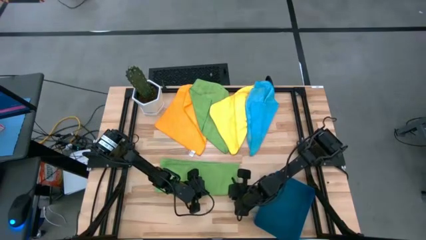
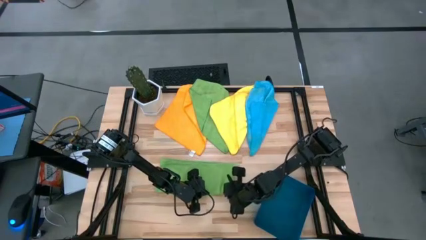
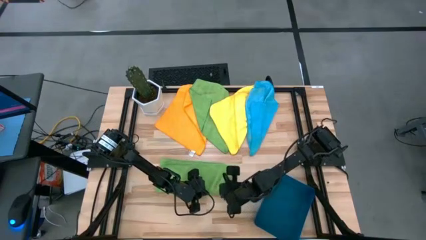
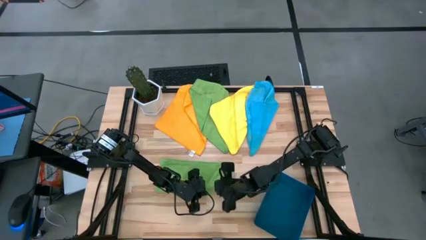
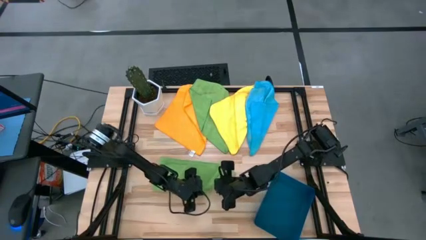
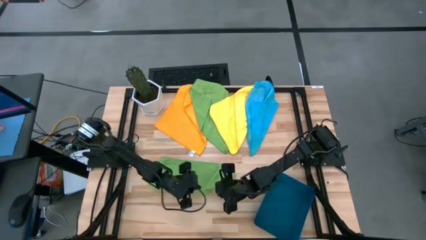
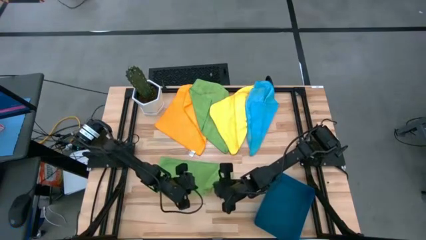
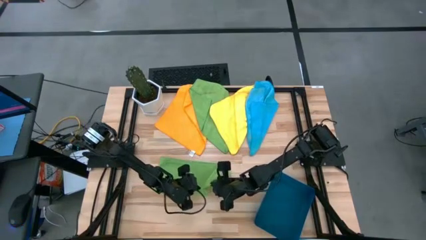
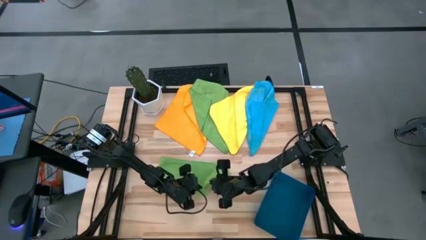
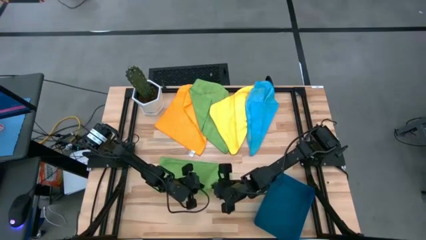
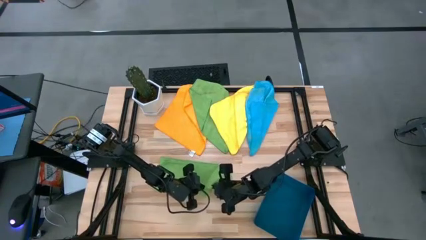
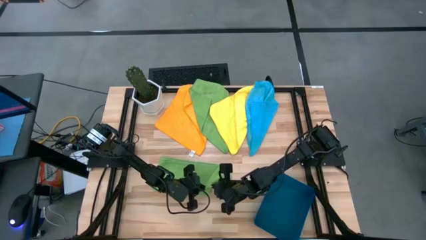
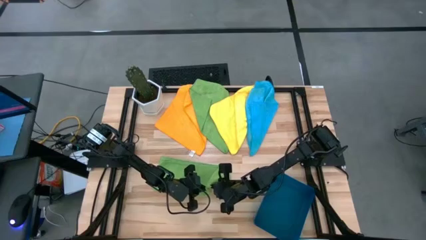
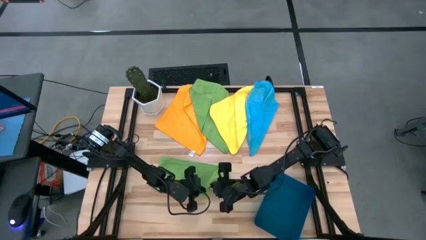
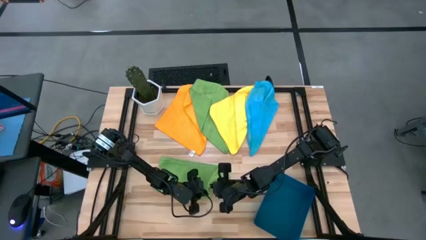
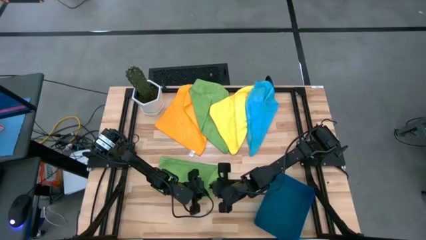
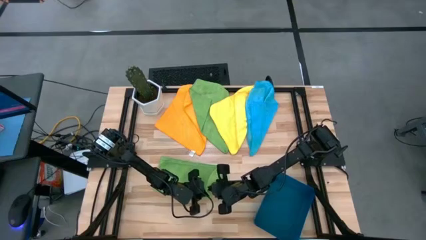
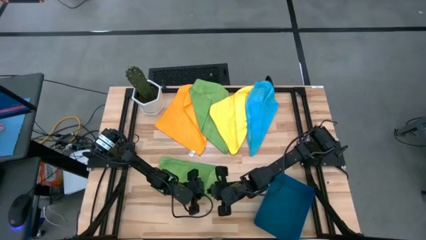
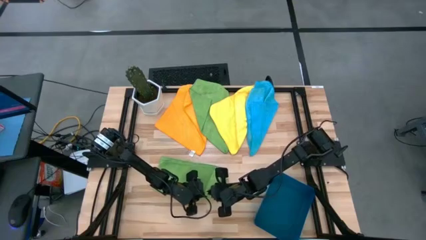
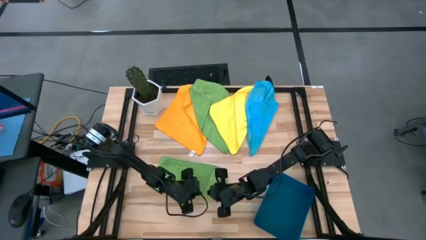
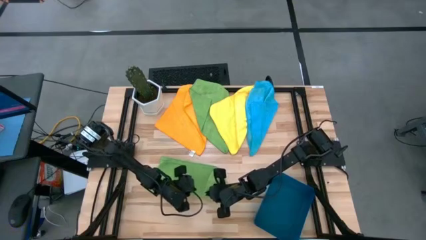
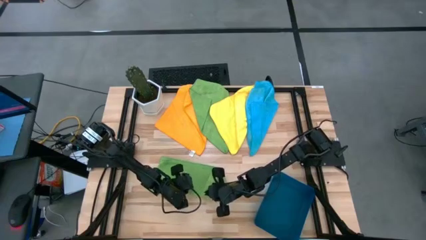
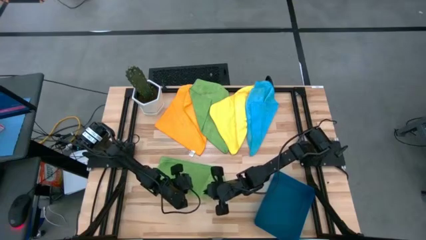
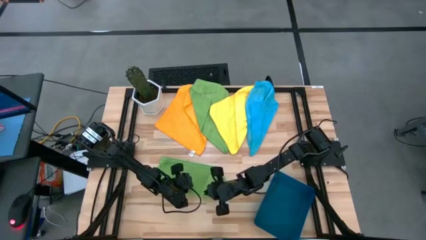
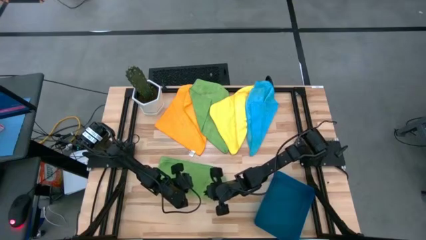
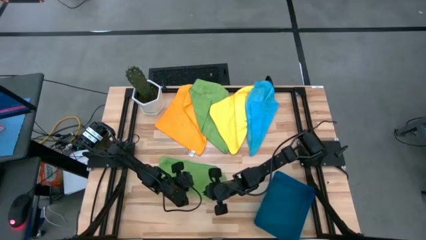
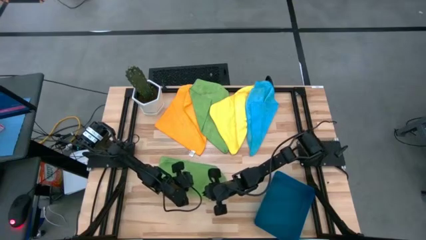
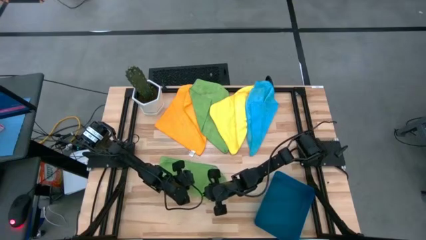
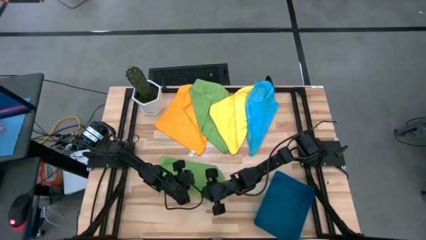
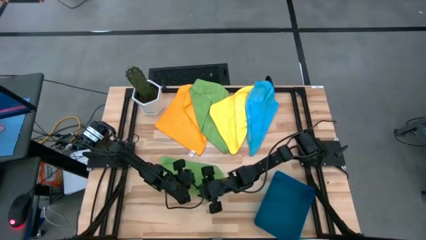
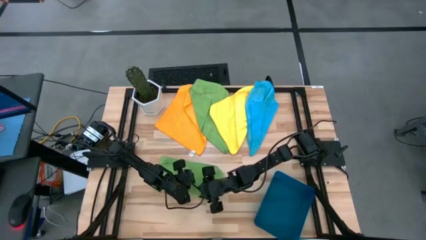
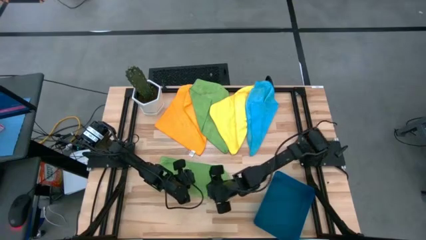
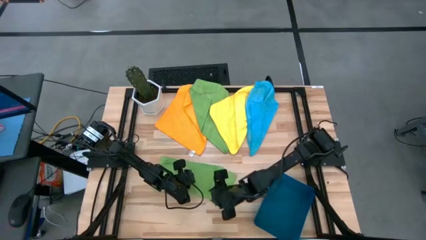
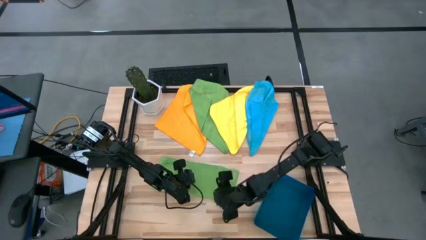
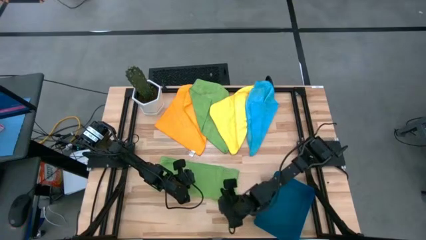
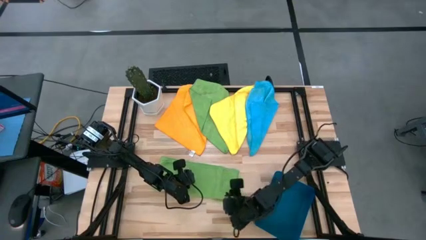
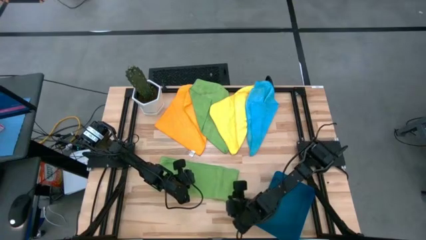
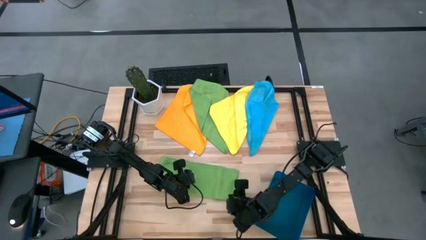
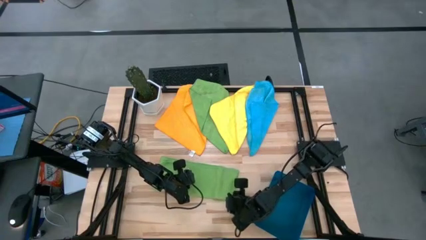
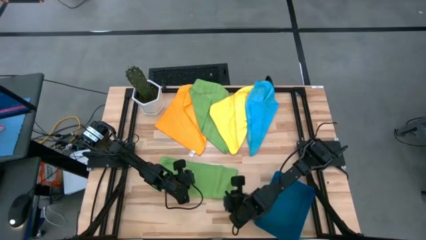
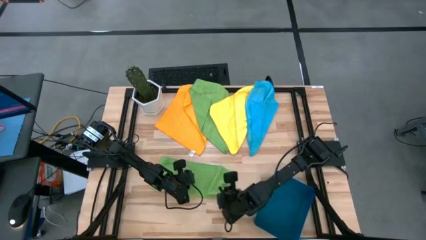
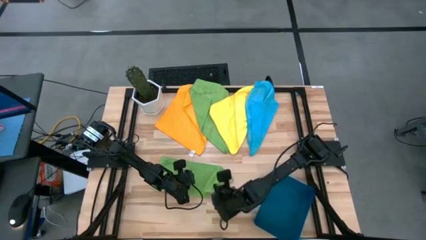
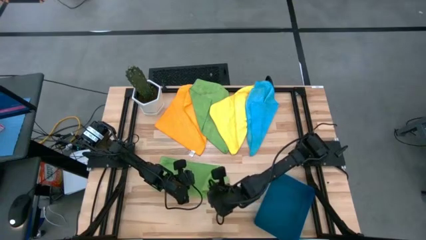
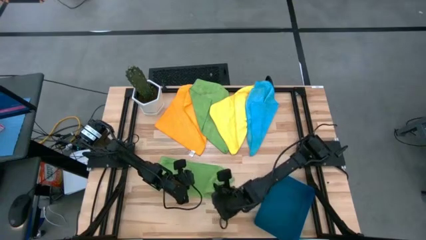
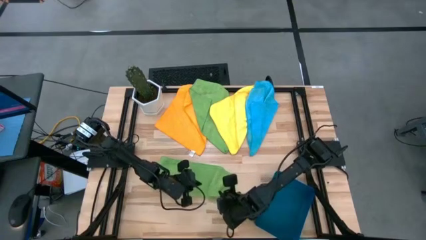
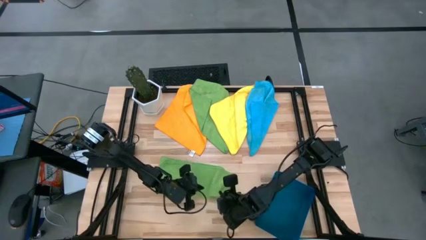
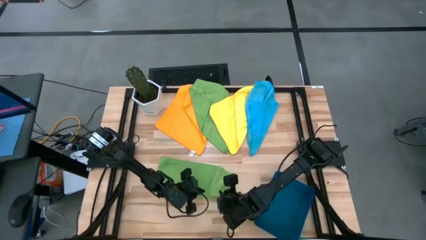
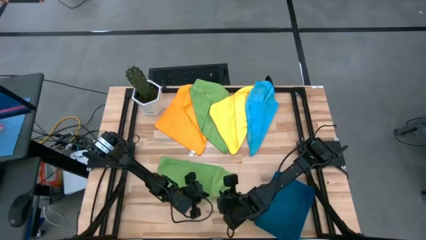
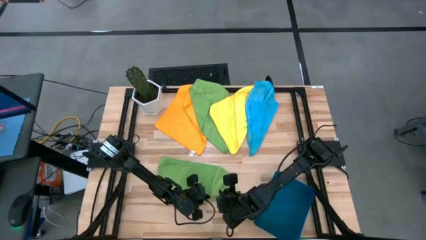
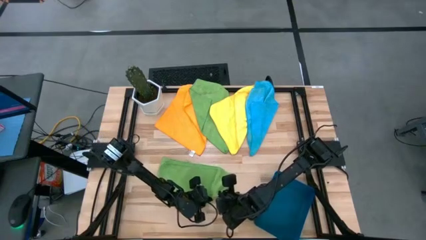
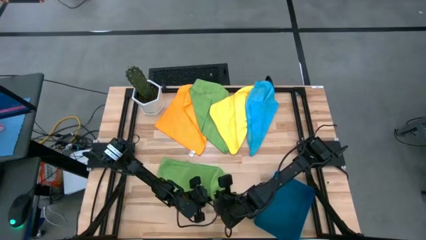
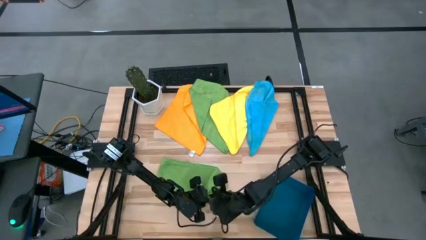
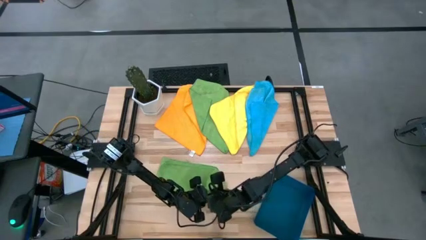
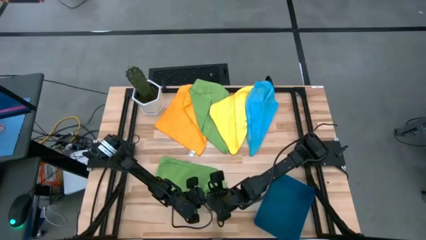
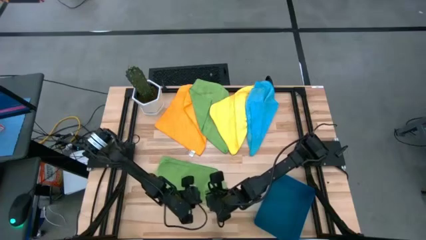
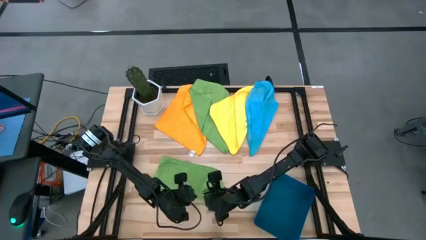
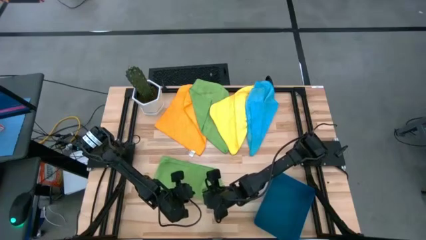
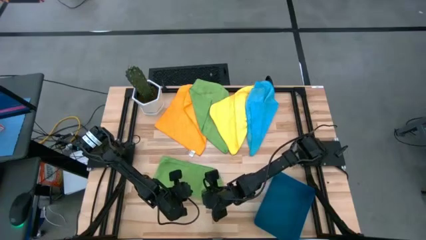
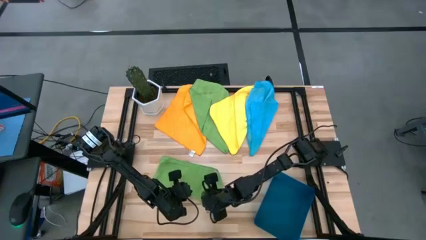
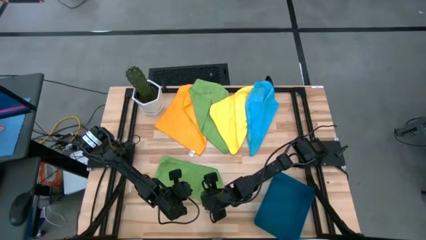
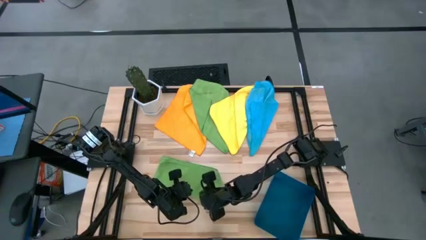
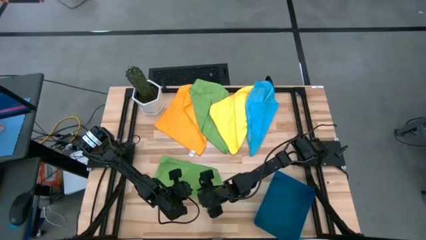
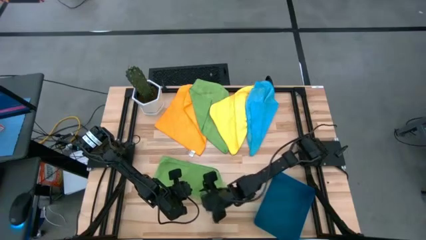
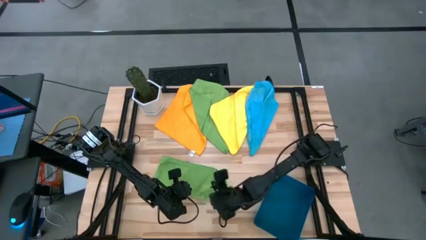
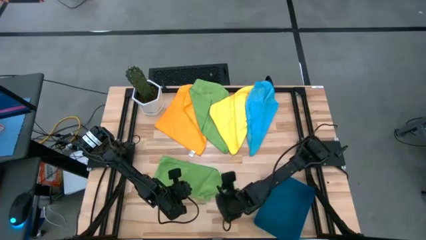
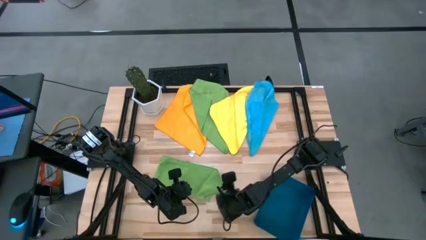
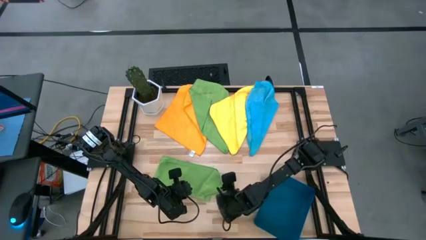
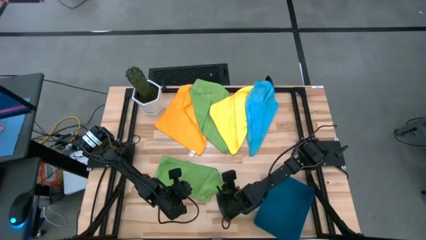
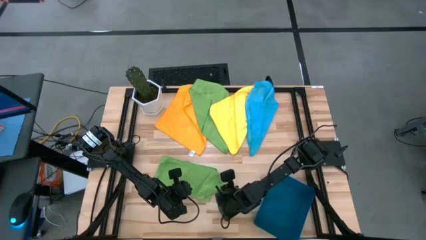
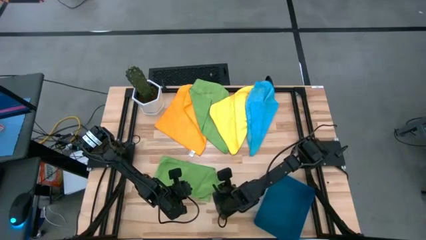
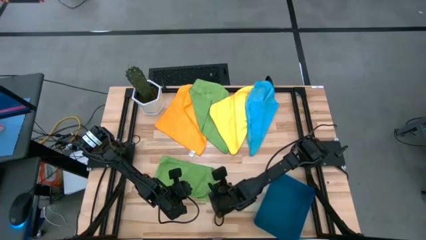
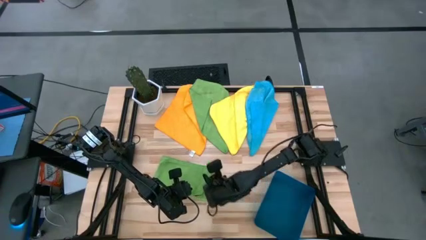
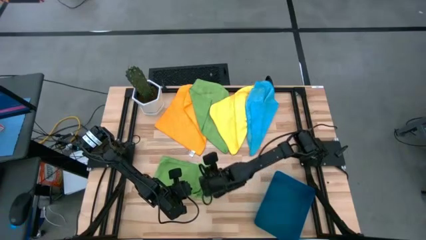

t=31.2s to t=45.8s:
Task: Fold microfiber towels
Fold the right green microfiber towel
